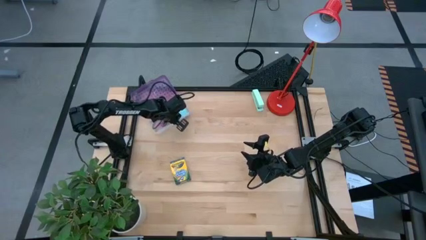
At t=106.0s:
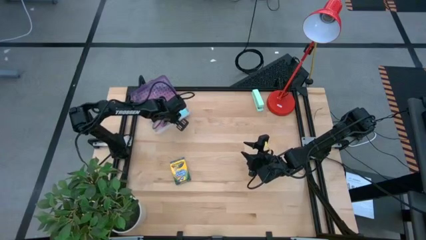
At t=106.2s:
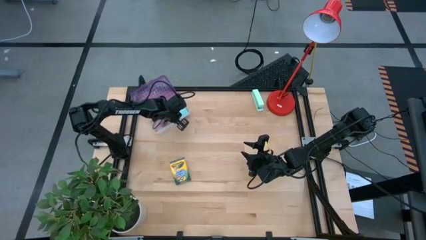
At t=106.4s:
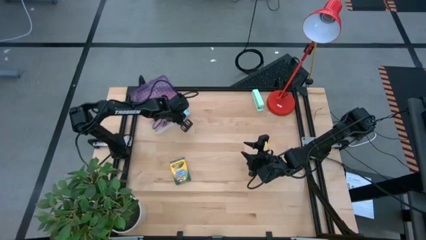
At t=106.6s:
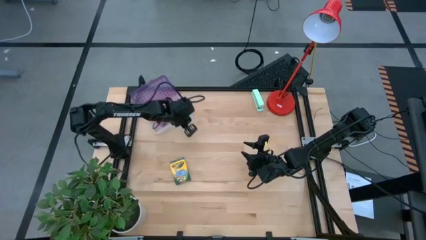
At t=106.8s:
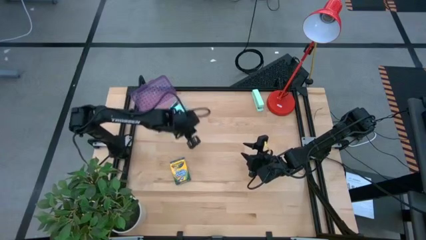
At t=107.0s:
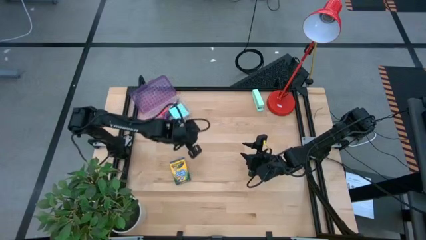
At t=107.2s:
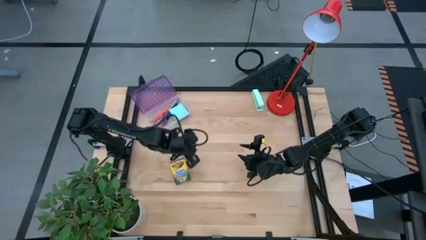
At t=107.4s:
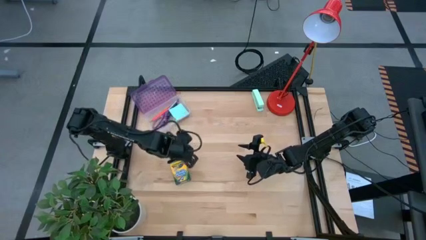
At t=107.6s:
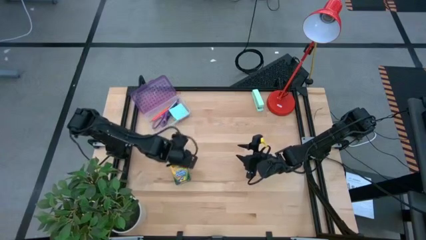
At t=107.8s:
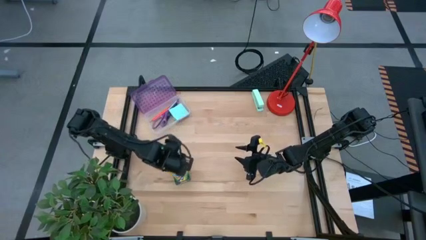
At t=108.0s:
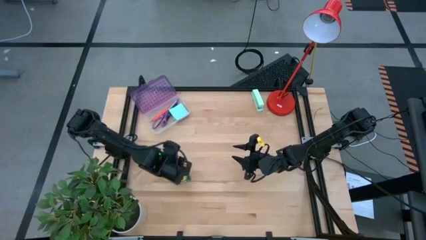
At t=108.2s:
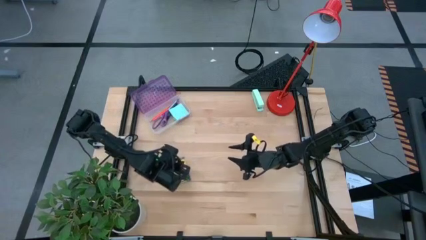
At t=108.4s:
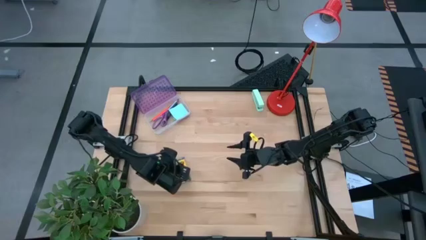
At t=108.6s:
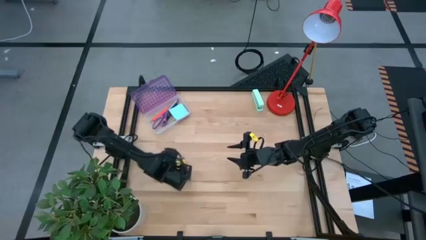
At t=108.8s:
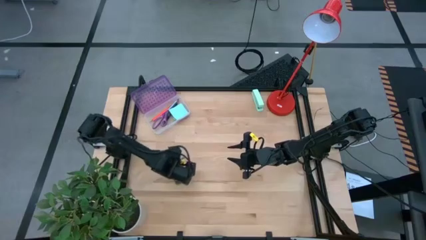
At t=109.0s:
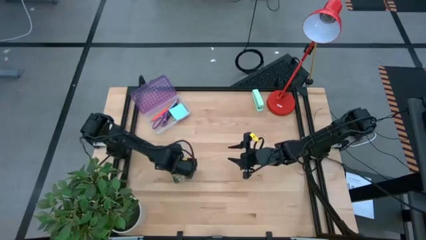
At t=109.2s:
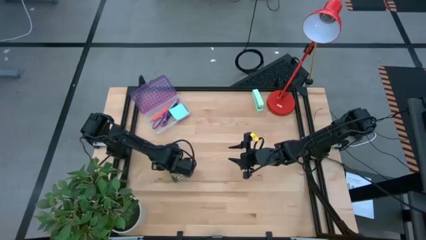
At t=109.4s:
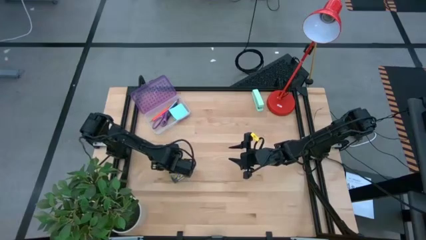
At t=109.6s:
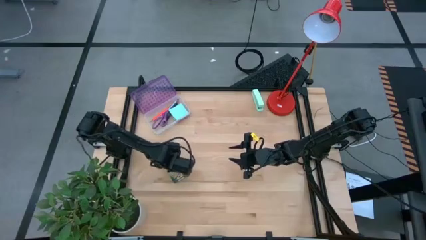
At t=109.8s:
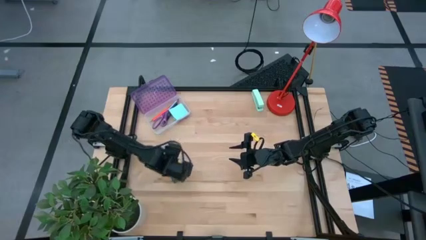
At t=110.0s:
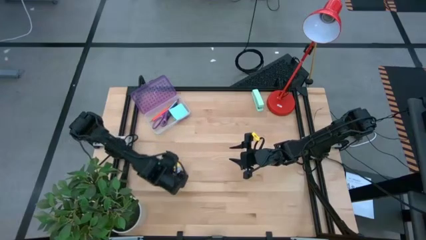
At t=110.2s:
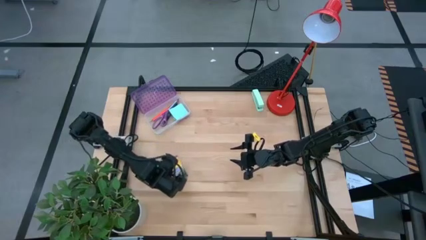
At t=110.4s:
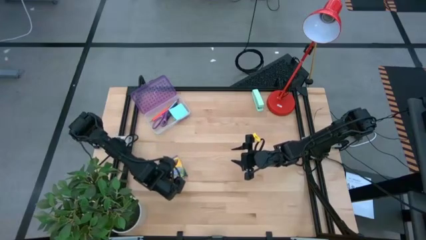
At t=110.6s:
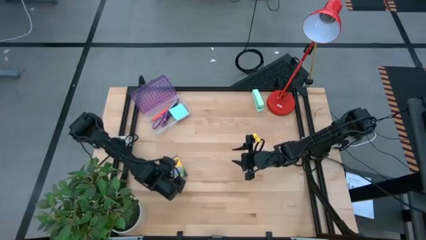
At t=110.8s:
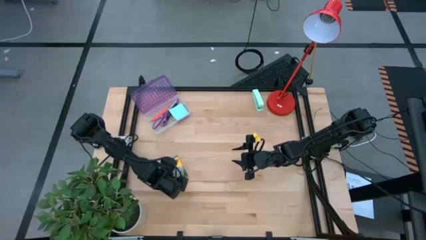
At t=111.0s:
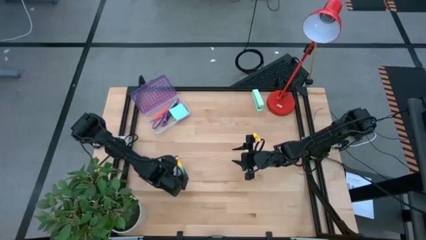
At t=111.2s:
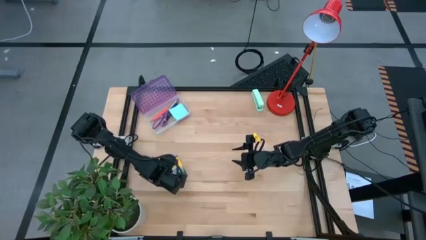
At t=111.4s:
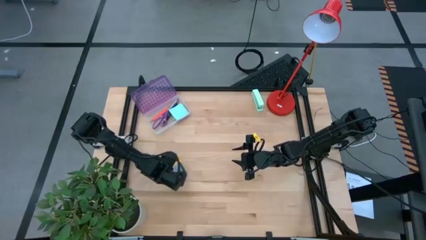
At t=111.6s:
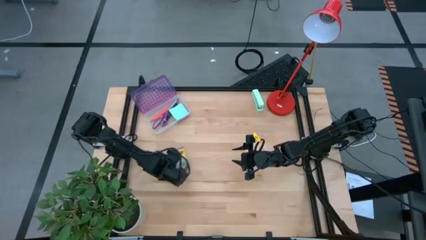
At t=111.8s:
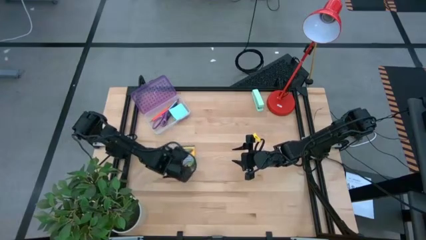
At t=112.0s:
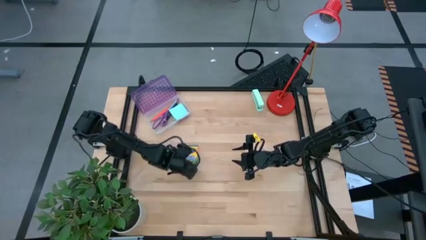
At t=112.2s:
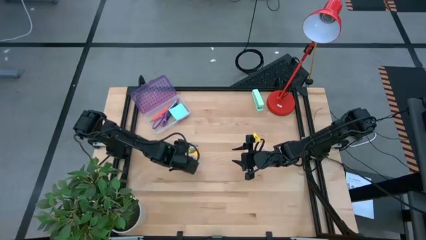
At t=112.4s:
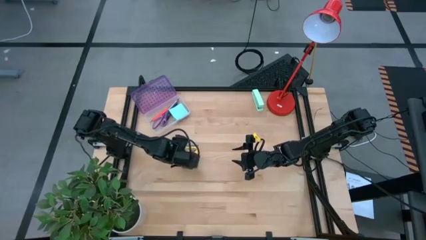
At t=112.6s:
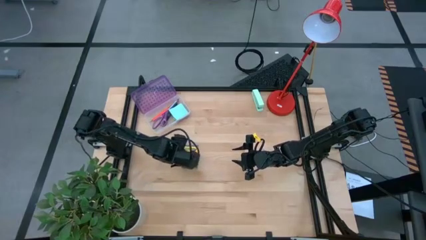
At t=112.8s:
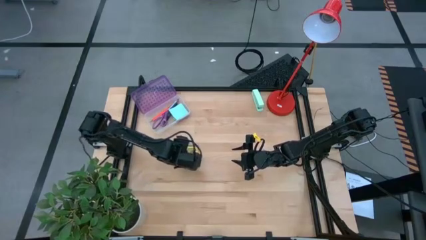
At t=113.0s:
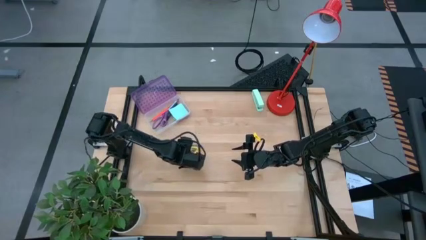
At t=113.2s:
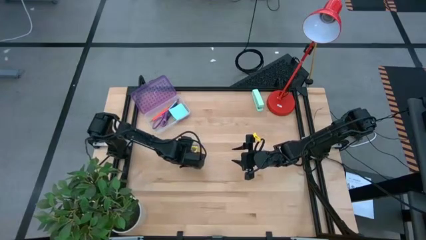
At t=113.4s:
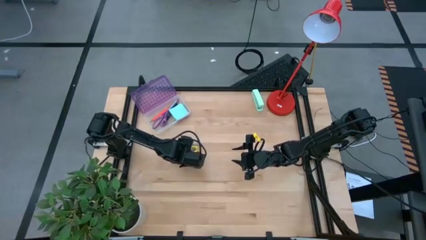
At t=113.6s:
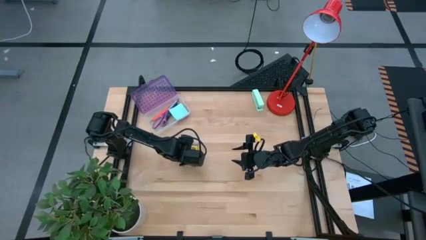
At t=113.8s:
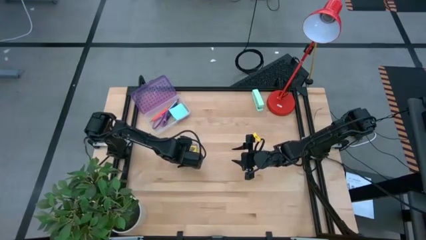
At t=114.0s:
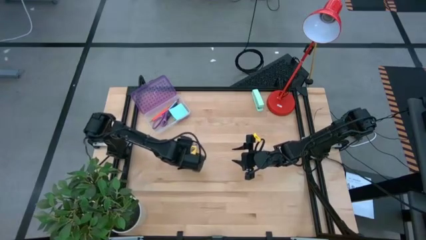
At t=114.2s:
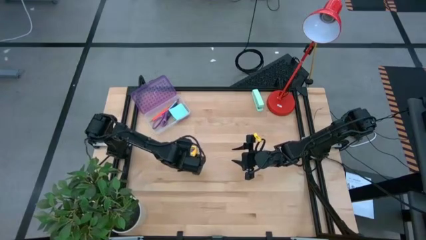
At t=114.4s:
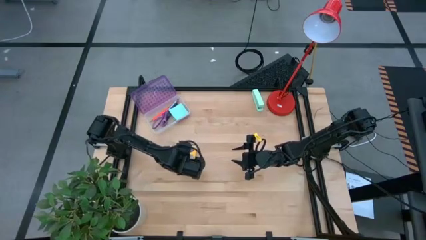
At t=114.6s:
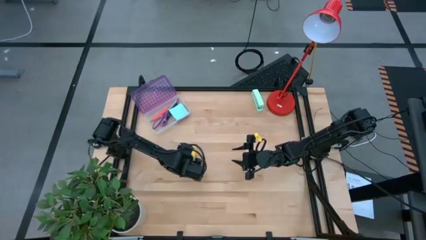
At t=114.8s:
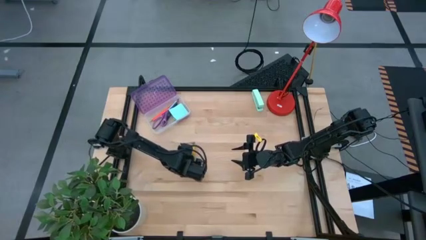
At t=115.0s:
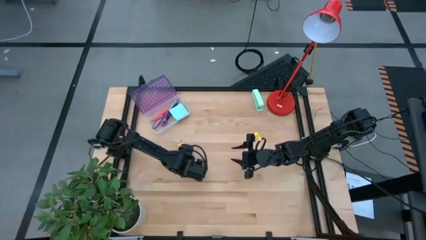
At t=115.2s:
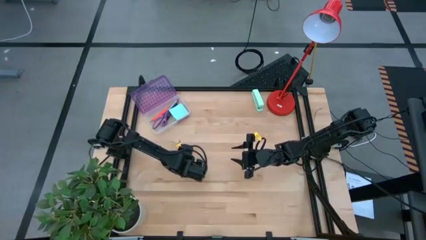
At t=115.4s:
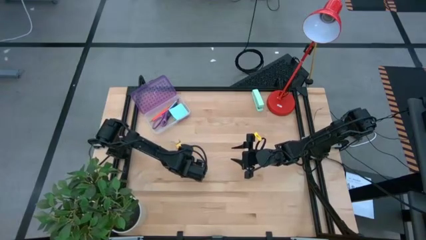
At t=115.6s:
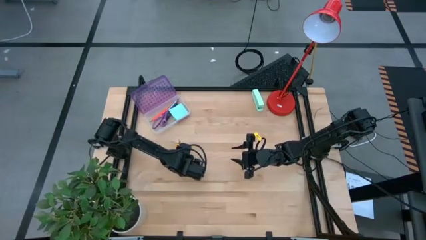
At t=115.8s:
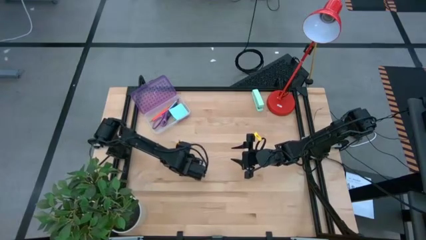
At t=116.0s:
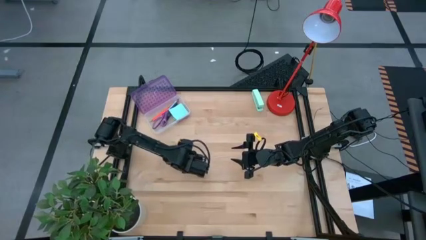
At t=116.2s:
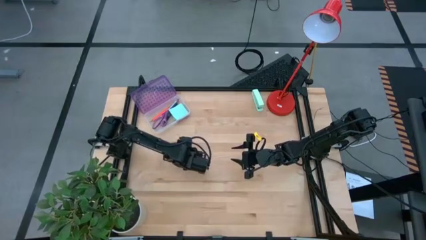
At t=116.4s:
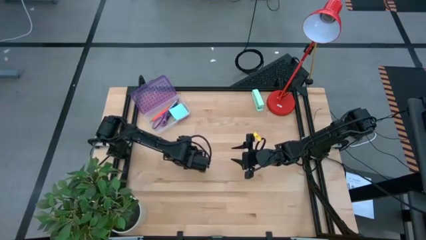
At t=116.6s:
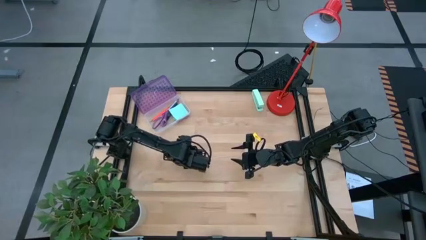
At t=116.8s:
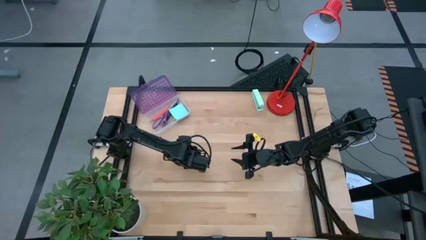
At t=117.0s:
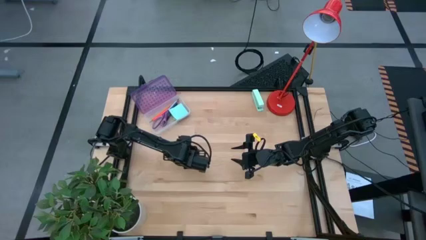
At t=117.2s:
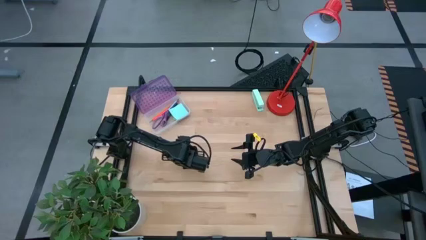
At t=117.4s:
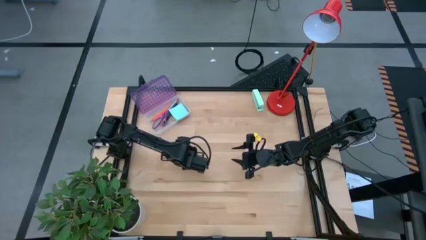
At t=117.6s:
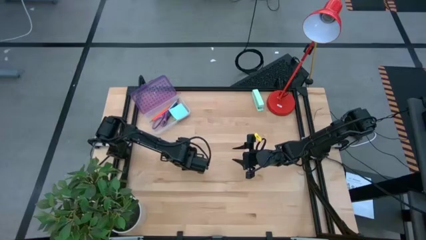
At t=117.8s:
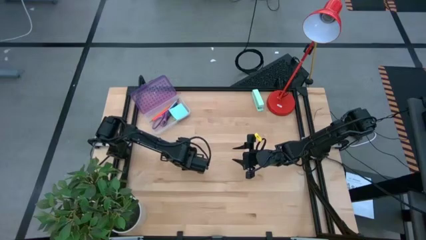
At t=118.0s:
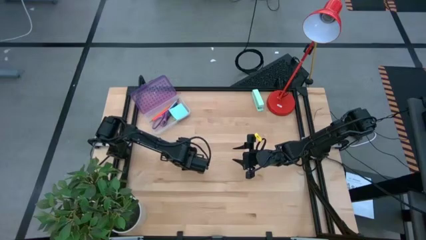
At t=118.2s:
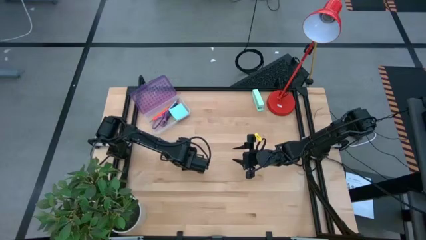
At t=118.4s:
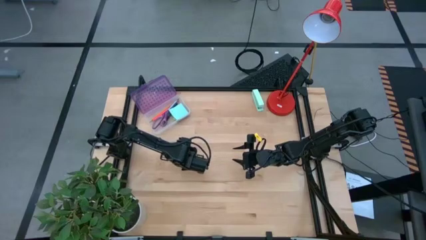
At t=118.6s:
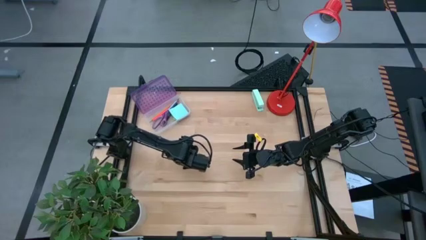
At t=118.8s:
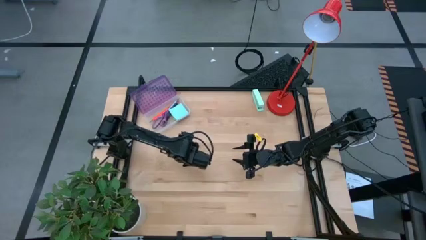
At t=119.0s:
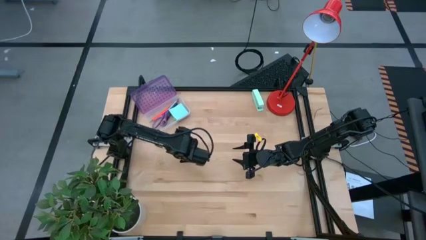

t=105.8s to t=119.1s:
Task: Pack school essentials
Put the crayon box into the purple supply box
